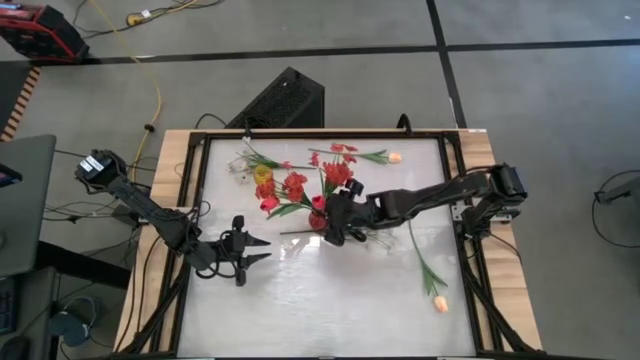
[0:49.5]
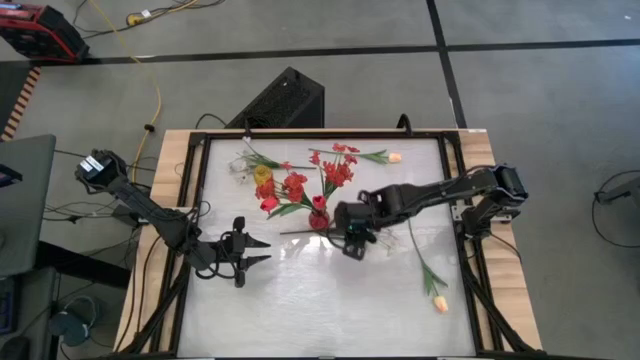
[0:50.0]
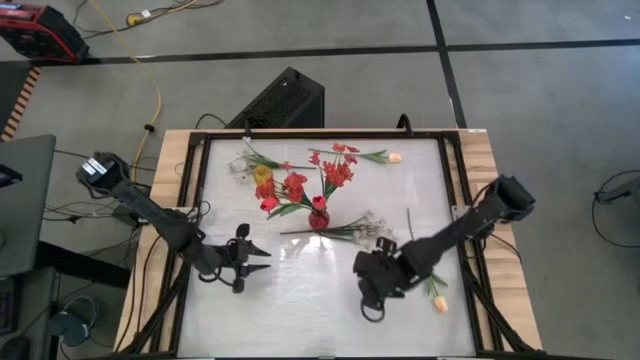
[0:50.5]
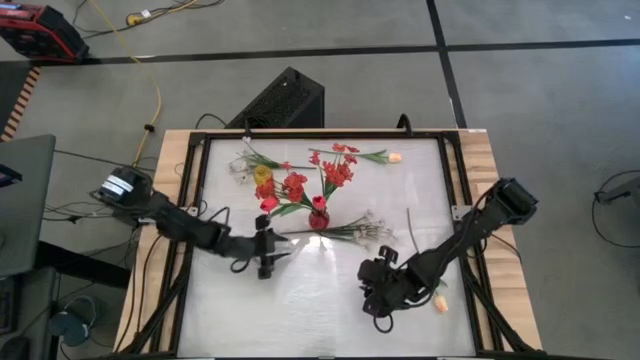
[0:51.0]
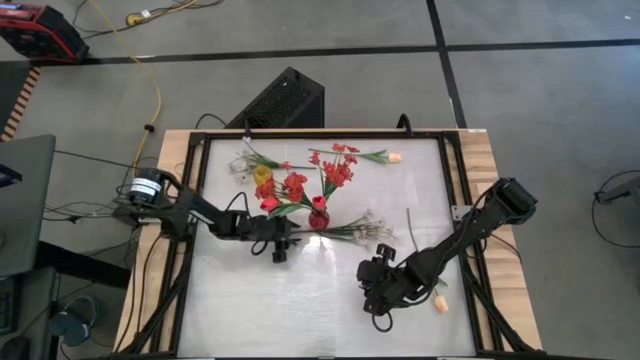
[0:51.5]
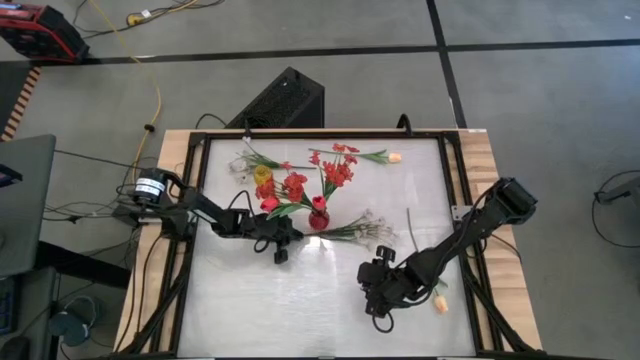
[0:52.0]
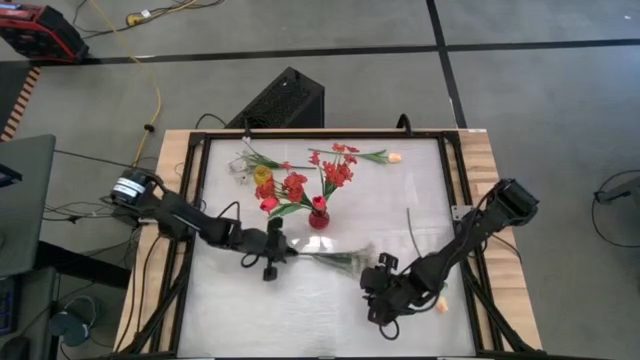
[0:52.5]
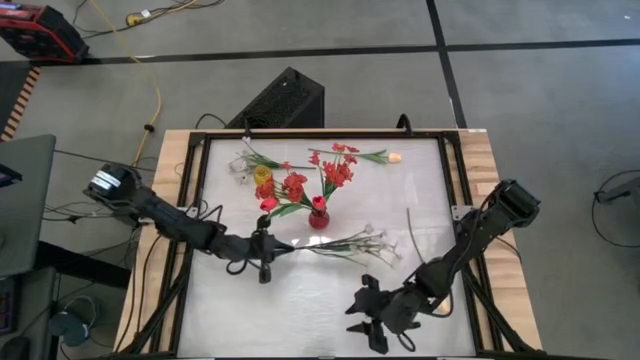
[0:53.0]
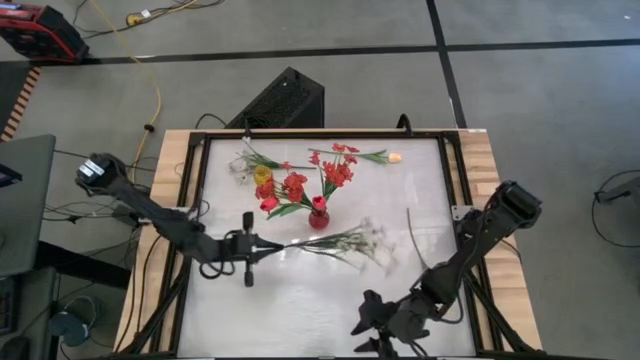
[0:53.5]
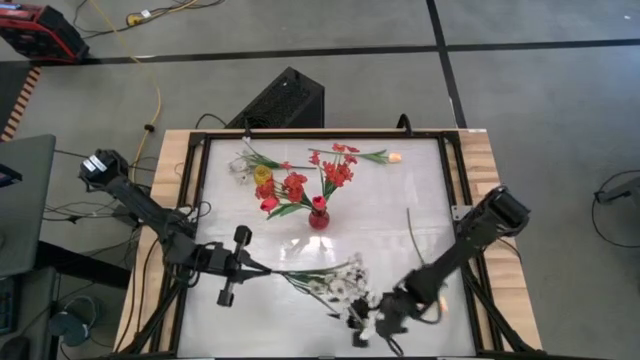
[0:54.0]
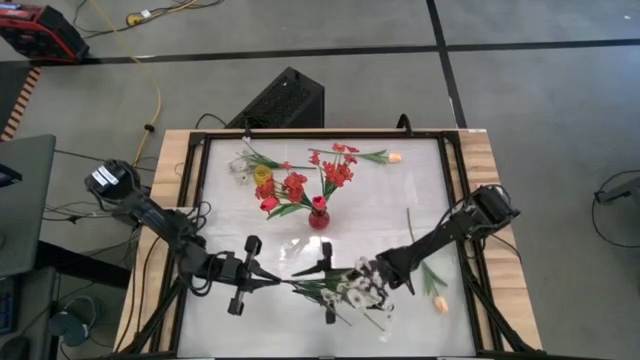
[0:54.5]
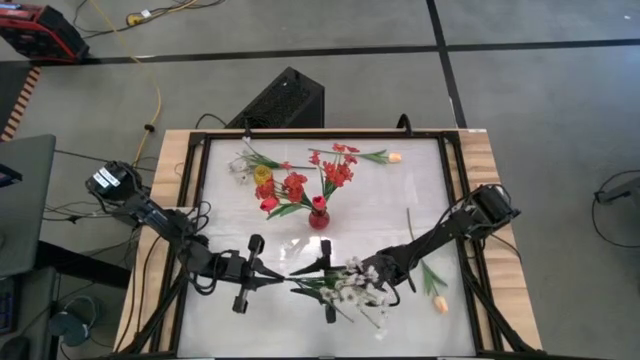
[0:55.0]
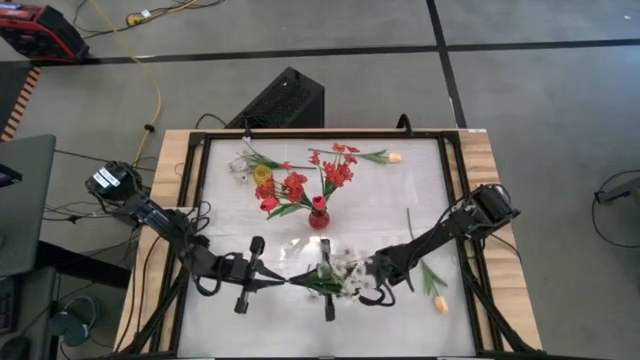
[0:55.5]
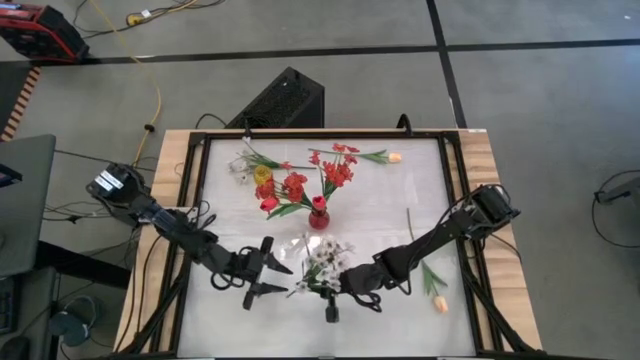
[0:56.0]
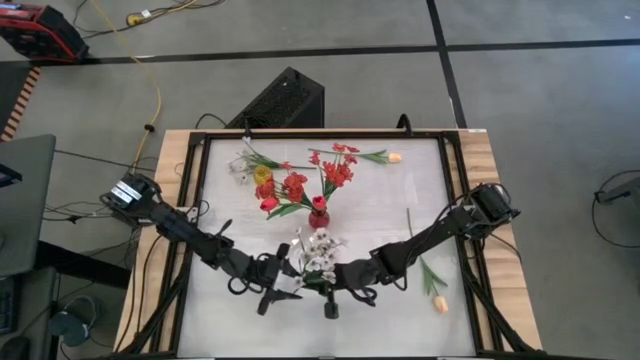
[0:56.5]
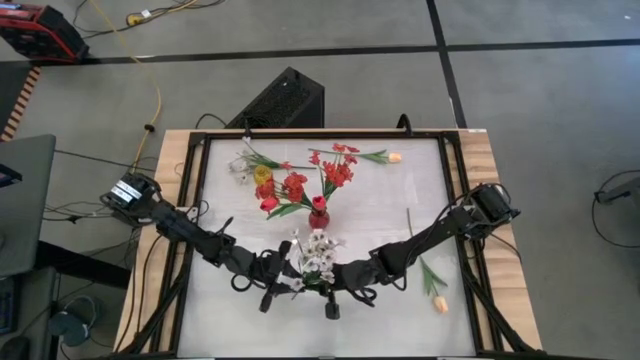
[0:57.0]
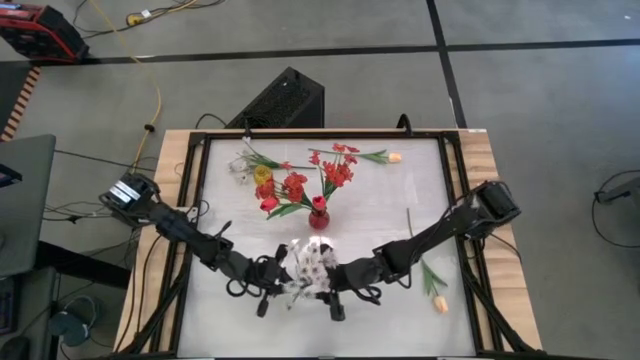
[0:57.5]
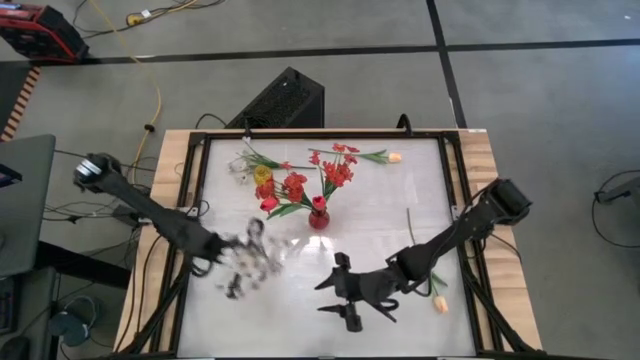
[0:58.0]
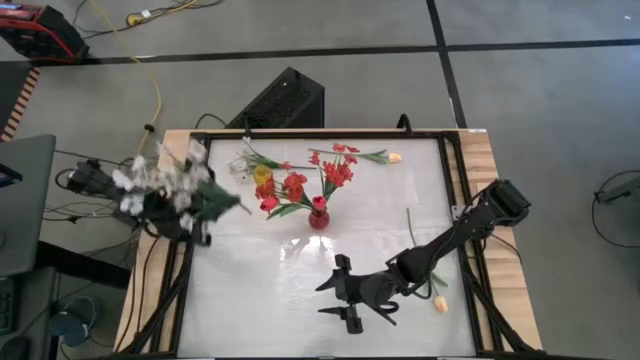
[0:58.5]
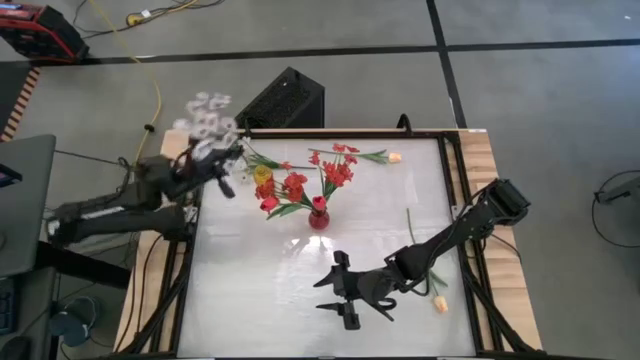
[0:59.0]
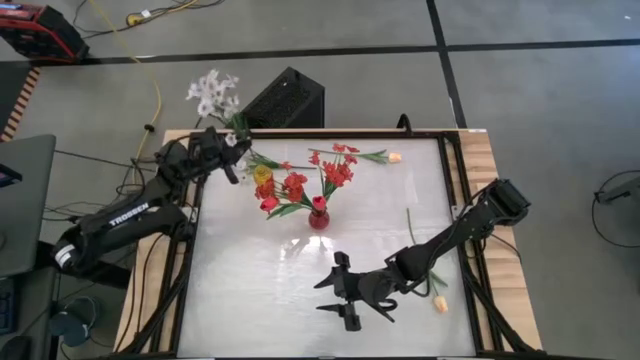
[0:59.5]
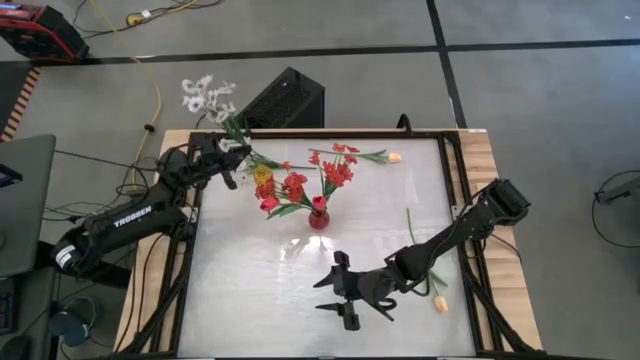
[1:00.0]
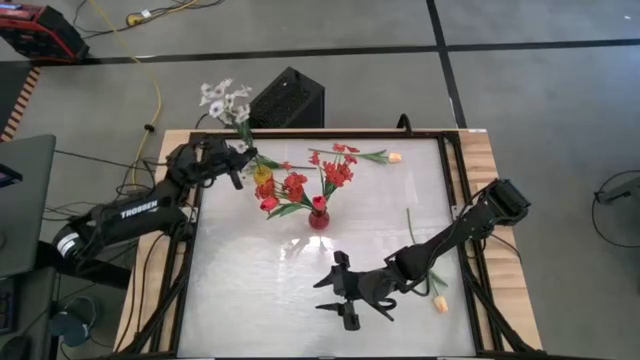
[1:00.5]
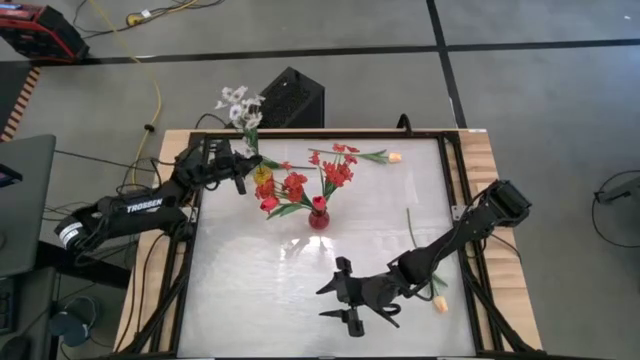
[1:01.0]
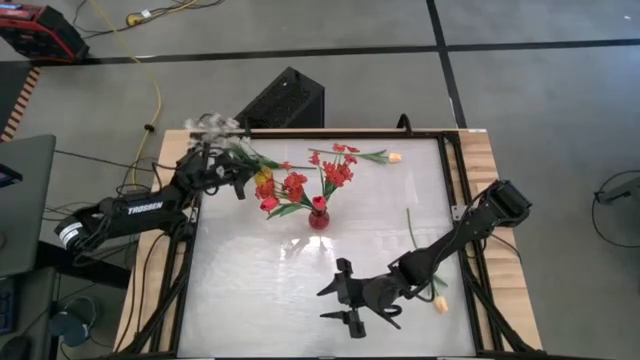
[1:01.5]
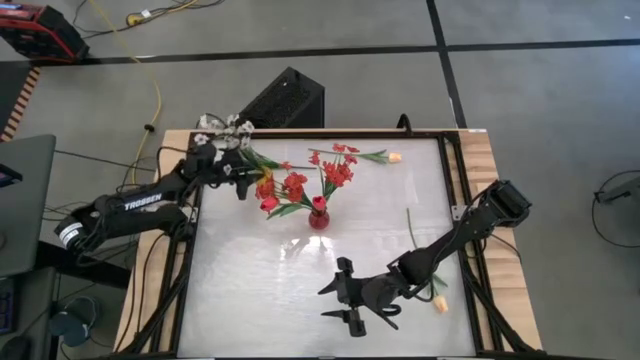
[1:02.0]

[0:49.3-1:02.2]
Task: Sort flowers into vase by color
Put the bottom white flowers into the yellow vase

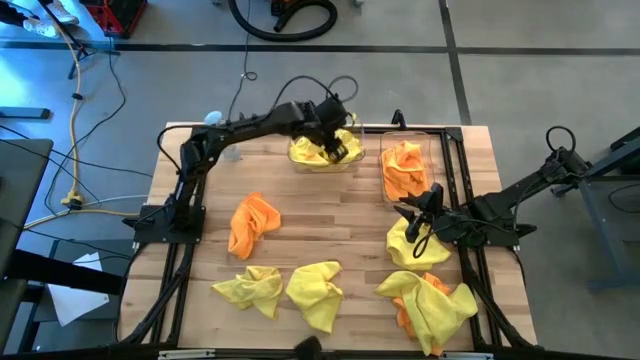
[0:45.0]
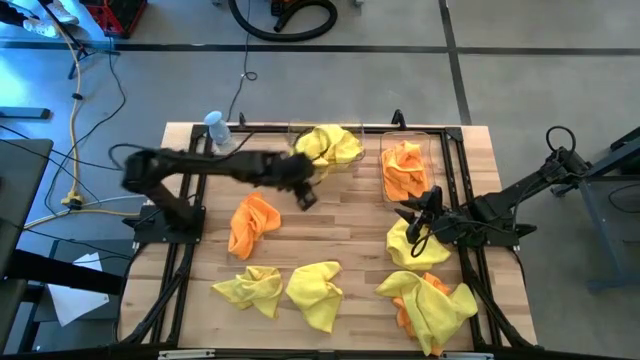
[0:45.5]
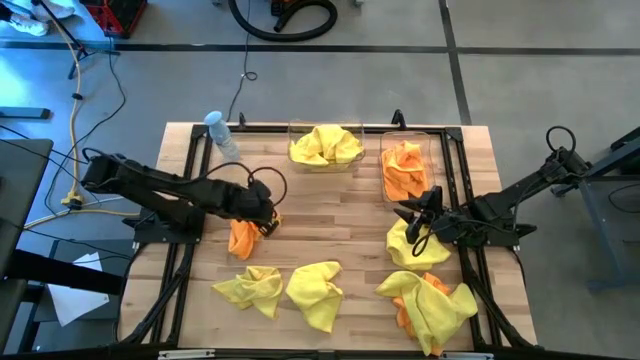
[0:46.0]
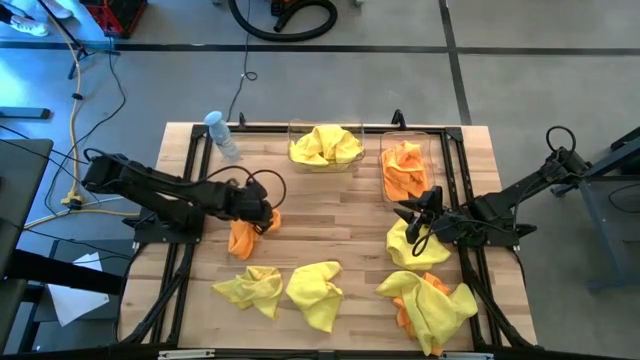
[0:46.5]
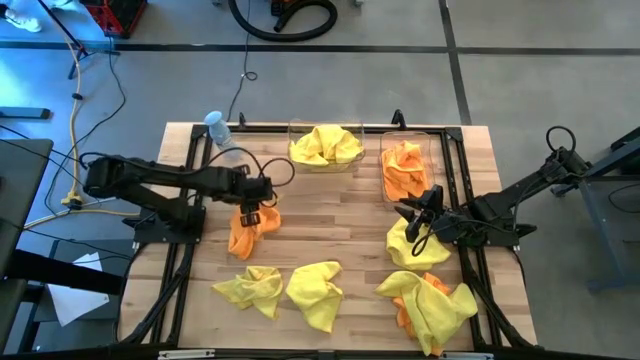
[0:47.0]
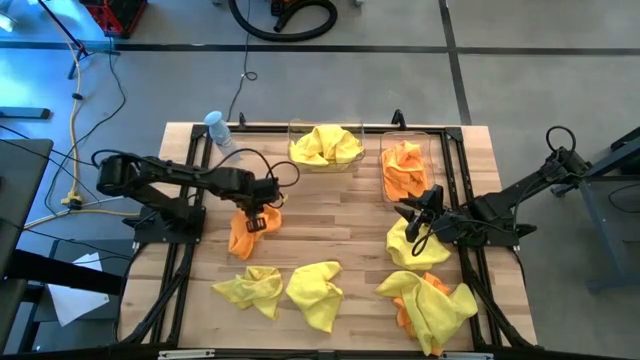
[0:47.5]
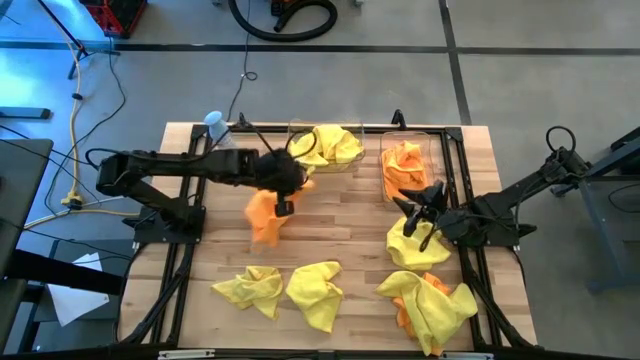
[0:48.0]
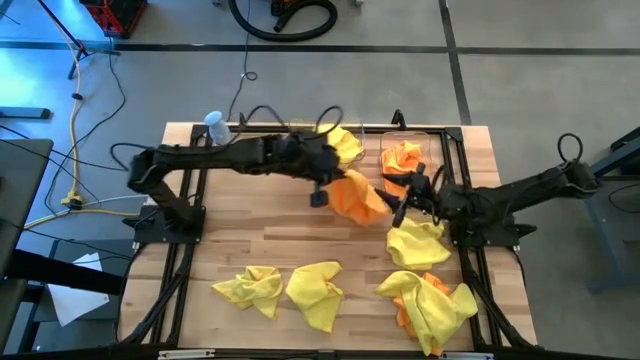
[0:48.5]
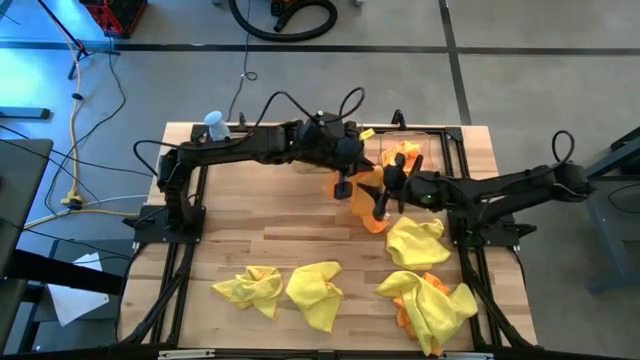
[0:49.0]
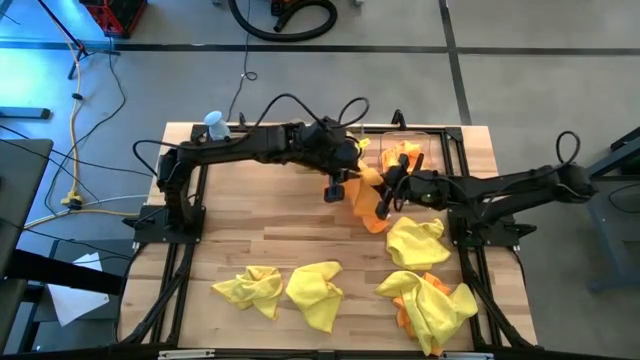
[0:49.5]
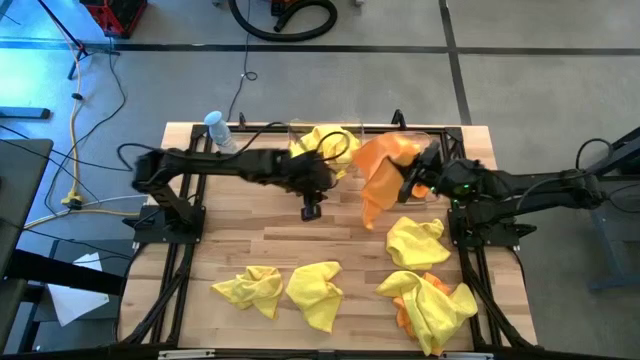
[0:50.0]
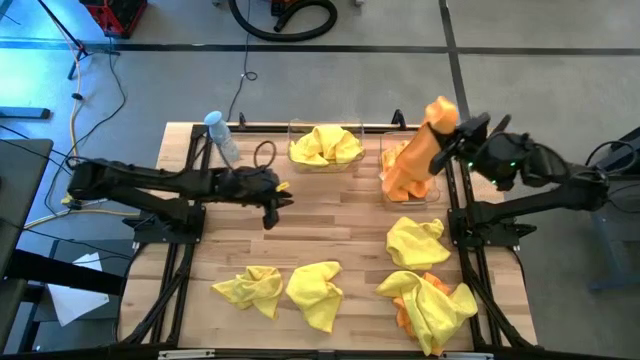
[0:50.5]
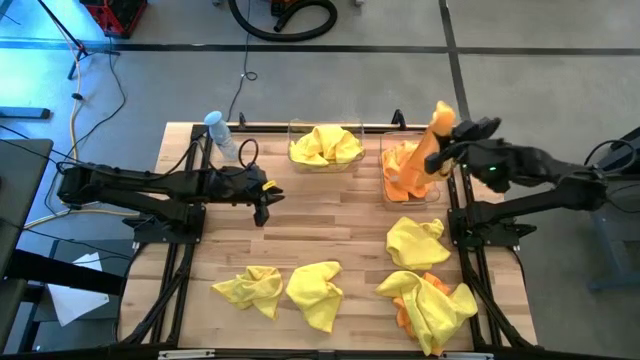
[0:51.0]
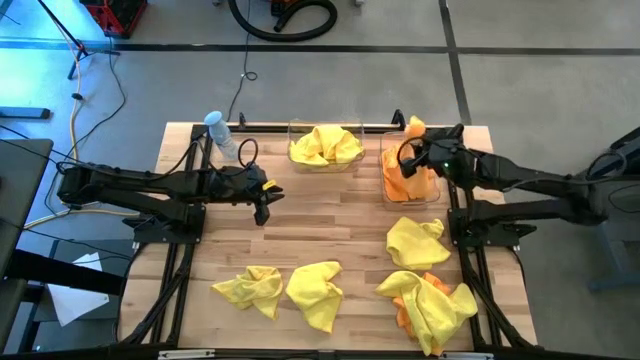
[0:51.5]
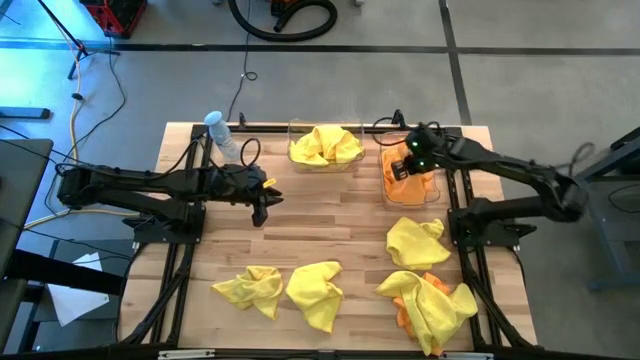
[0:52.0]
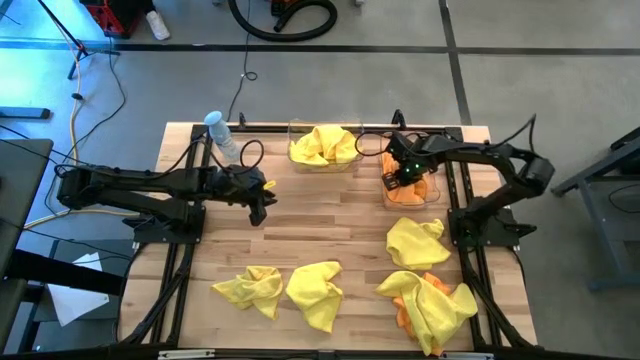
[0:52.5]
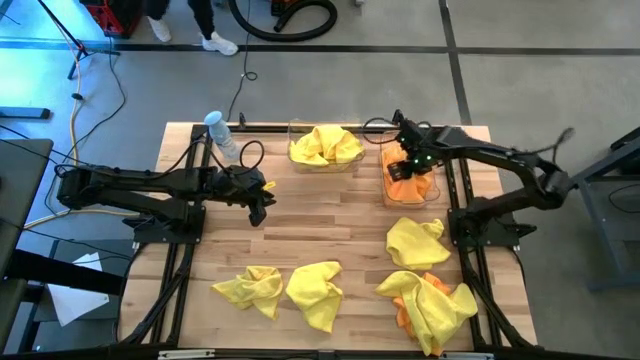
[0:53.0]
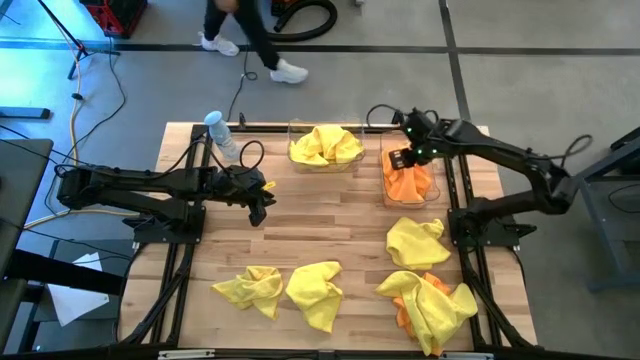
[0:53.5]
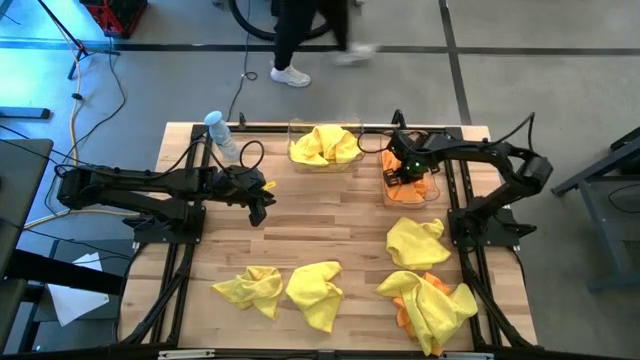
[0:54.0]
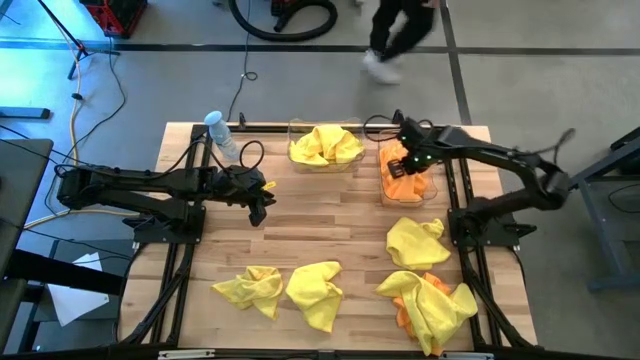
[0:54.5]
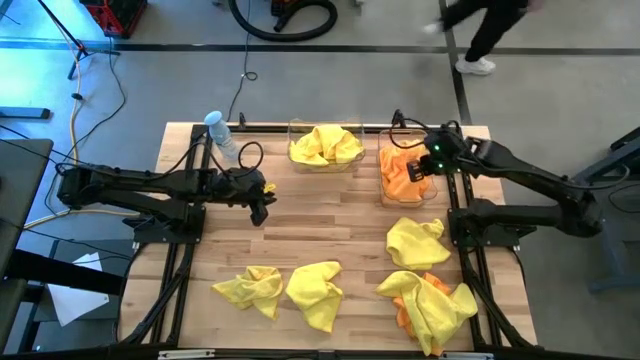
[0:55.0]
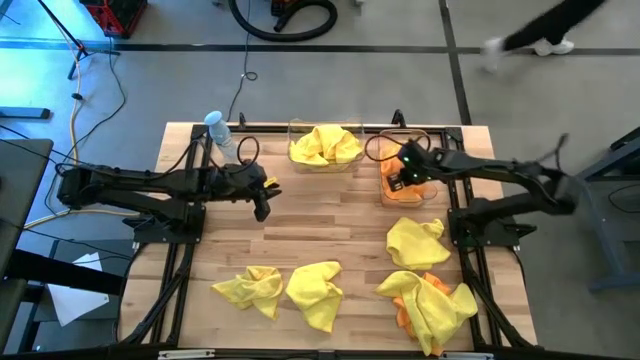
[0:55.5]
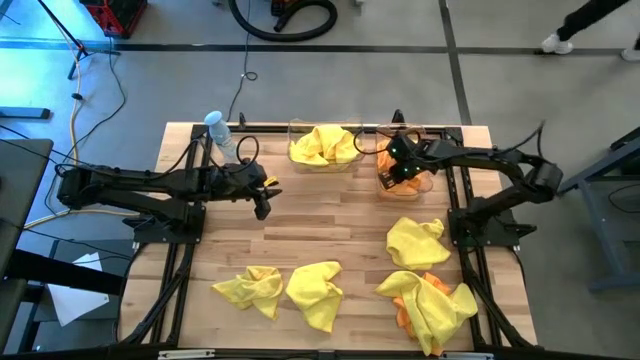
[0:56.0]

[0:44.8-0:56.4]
Task: Sort microfiber towel by color & place in baskets
Put the orange microfiber towel into the right transparent bin
